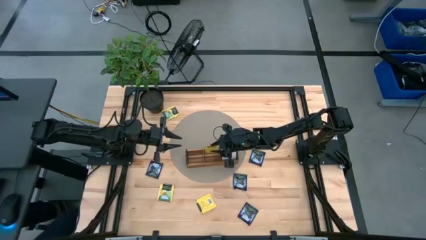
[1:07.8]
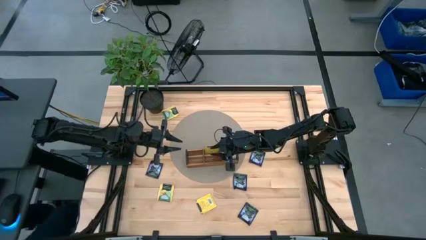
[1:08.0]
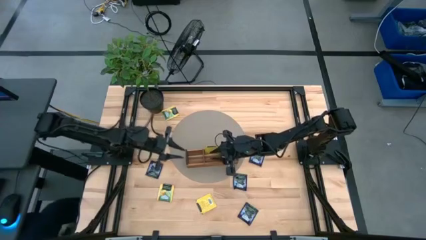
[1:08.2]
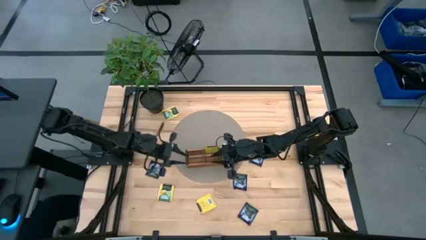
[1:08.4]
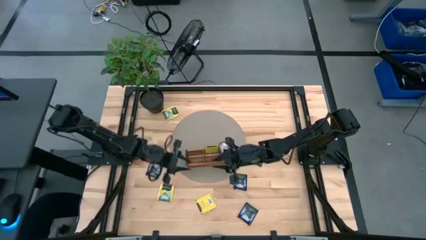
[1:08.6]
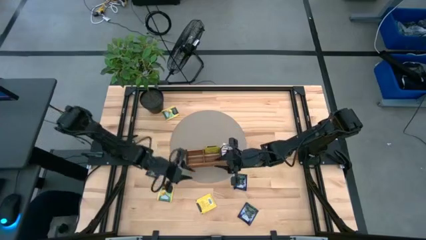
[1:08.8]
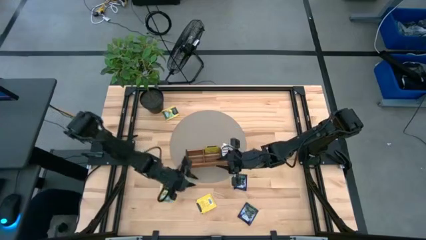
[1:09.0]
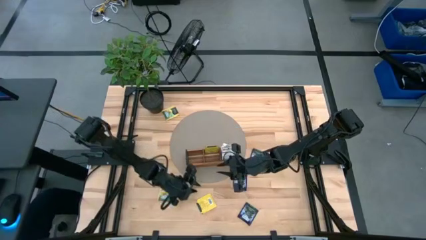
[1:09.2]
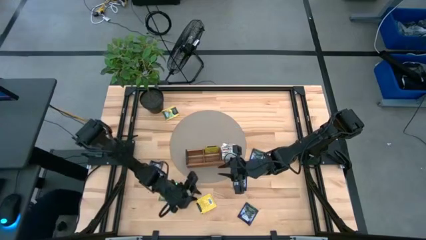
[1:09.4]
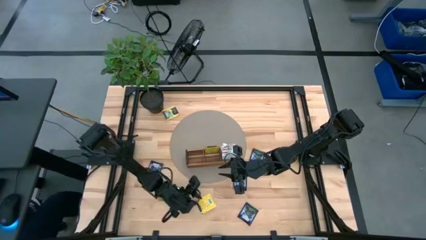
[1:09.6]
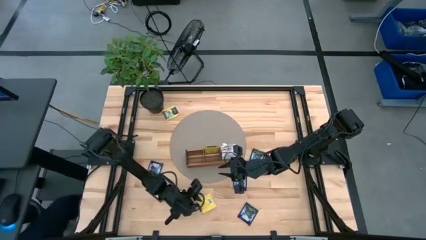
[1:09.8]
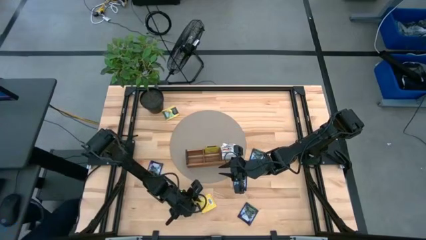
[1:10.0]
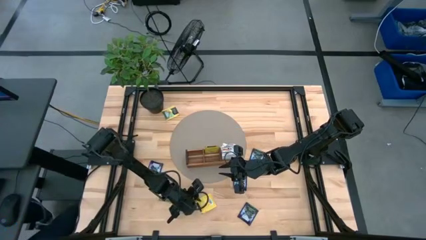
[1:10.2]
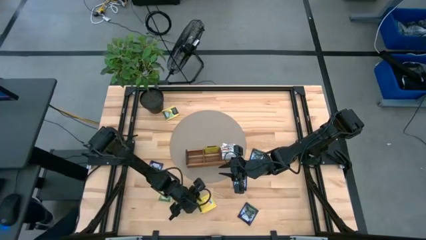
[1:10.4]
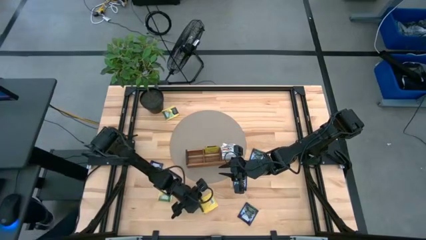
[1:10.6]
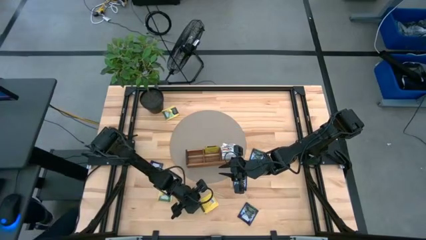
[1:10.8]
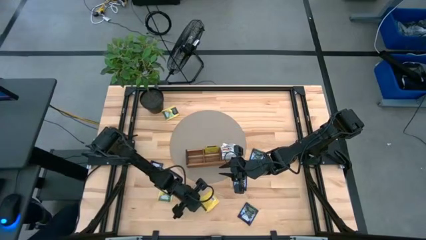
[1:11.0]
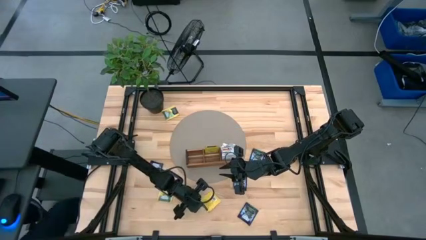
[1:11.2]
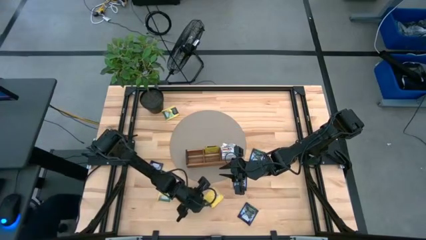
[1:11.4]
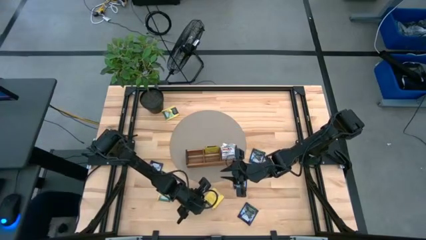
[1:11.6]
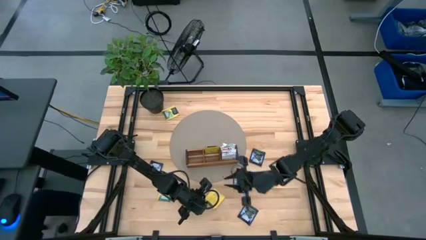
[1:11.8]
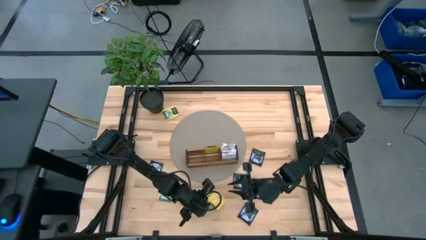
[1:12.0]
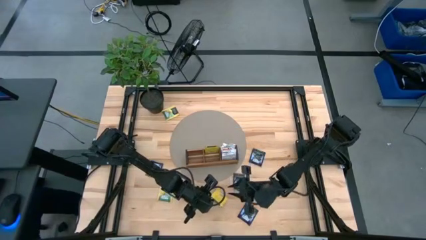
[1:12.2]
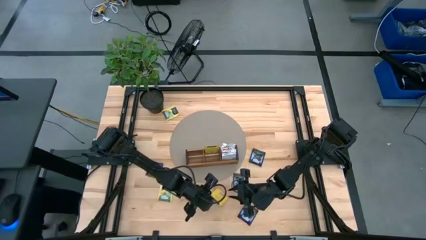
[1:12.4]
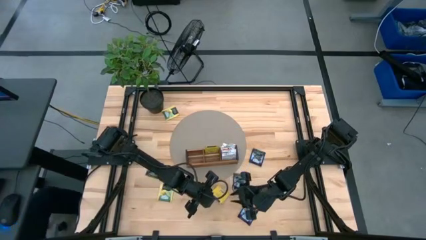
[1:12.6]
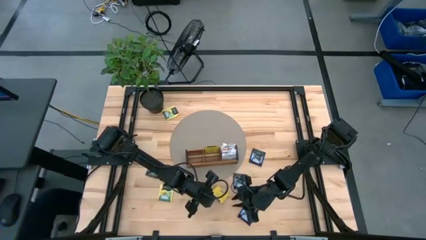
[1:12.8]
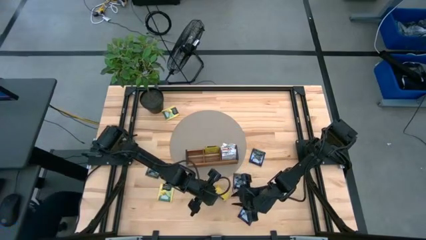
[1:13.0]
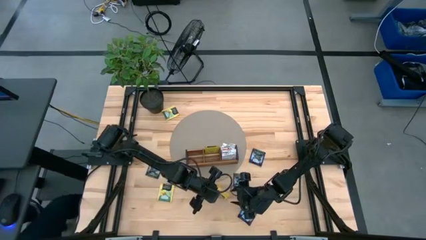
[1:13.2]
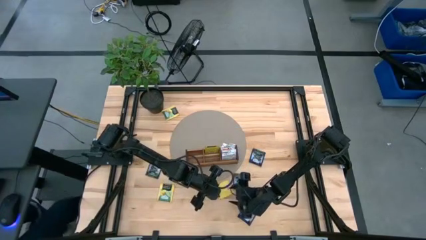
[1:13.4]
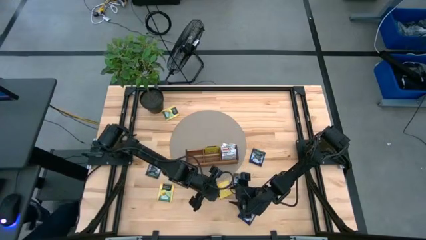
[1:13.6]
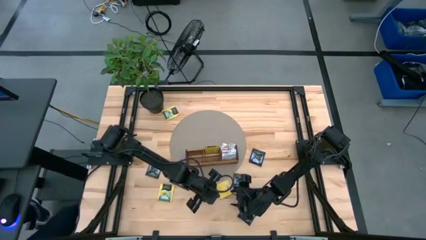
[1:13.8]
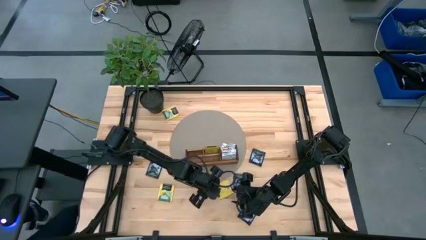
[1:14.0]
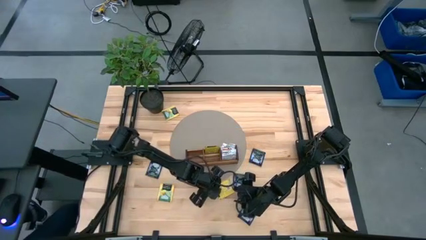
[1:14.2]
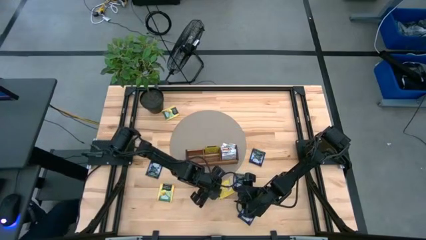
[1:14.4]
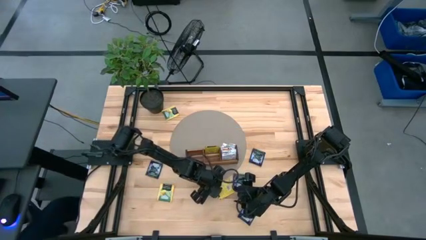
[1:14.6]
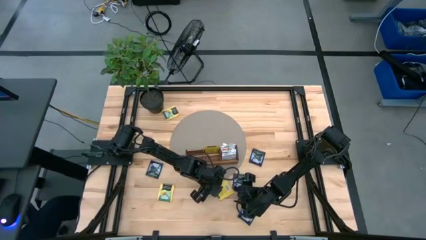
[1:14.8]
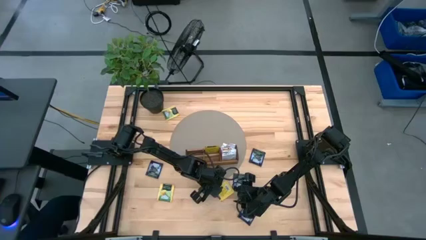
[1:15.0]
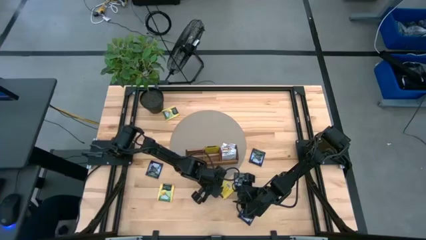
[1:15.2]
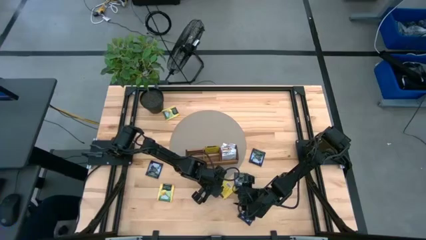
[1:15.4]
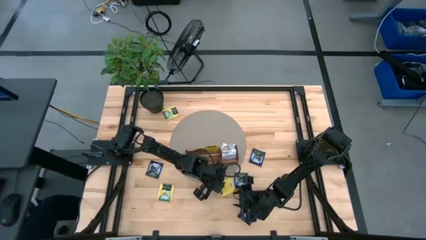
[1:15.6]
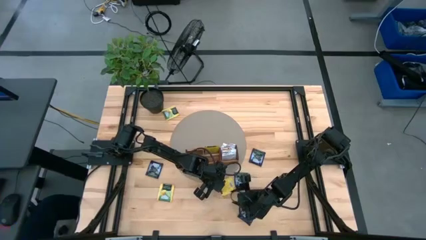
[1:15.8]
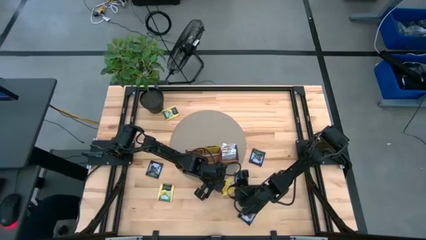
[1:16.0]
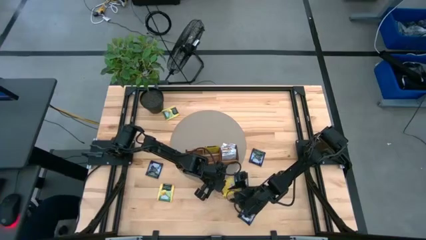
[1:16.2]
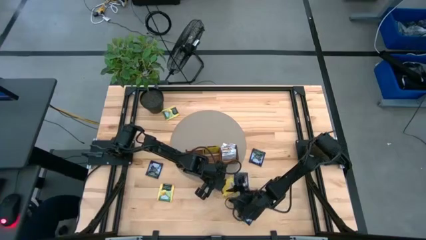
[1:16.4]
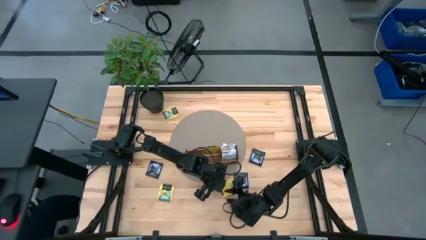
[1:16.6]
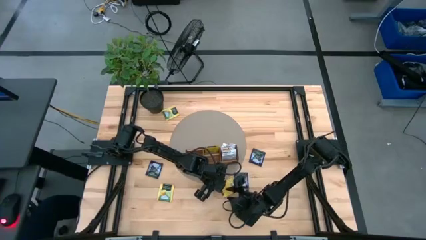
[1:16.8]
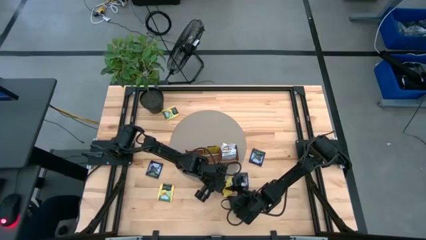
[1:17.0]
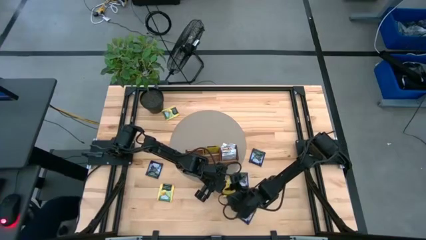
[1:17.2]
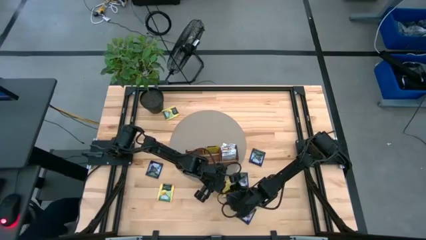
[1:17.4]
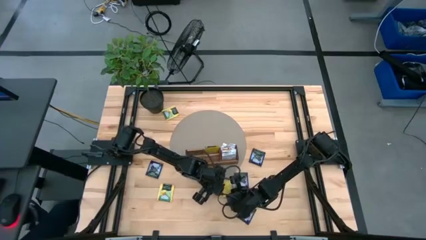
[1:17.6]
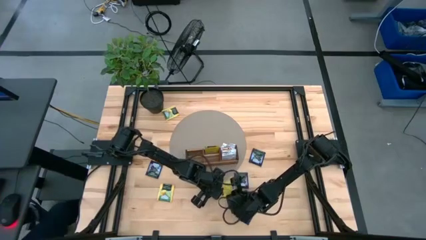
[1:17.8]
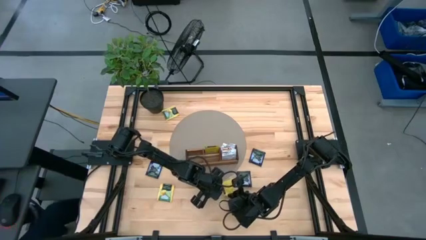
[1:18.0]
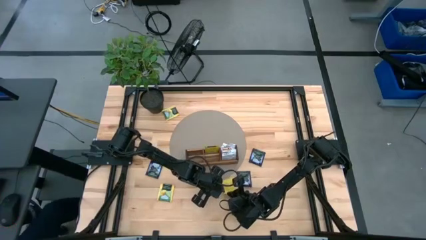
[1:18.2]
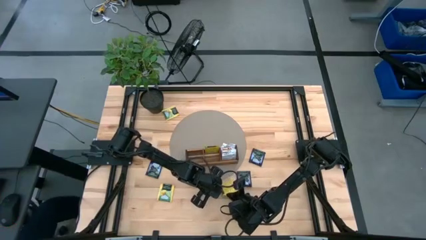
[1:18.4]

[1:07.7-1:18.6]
Task: Pick & Place Tea
Put the yellow tea bag into the middle section of the wooden organizer

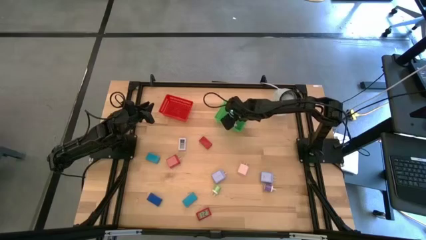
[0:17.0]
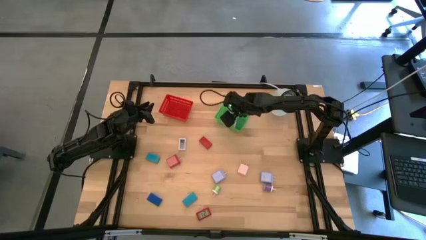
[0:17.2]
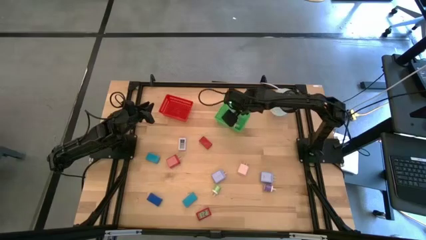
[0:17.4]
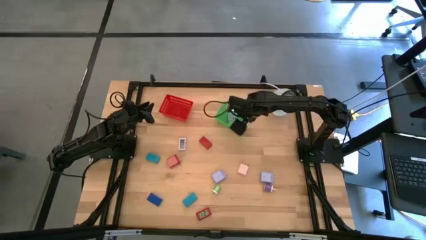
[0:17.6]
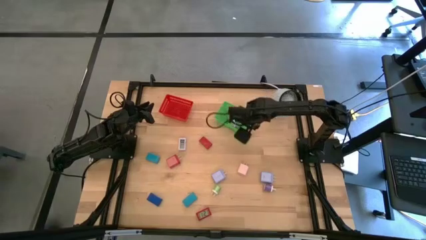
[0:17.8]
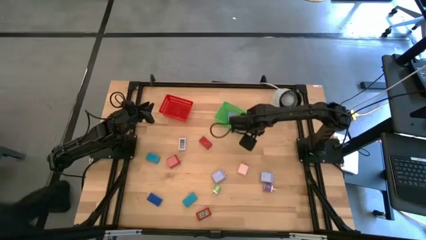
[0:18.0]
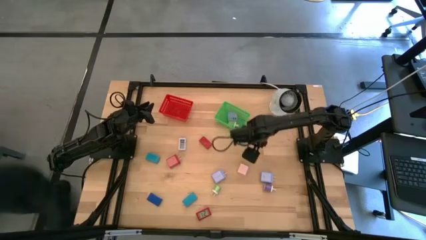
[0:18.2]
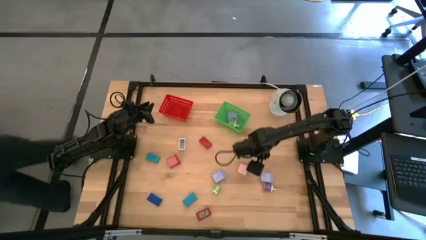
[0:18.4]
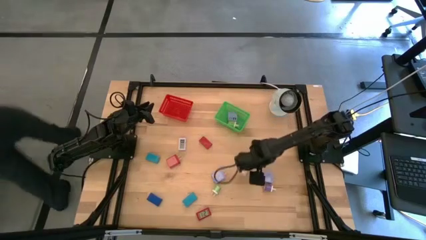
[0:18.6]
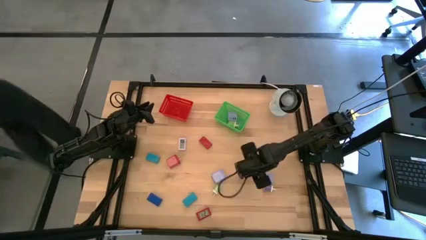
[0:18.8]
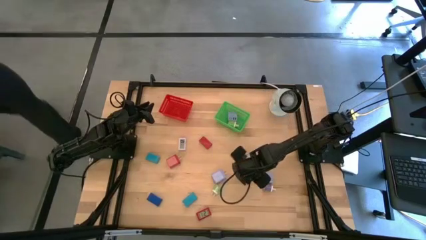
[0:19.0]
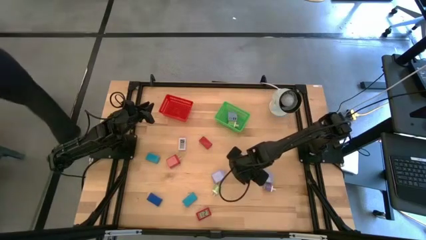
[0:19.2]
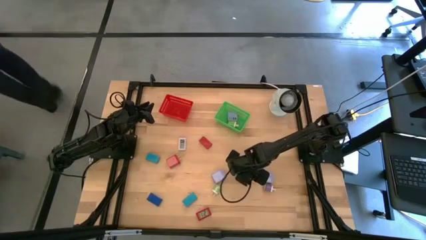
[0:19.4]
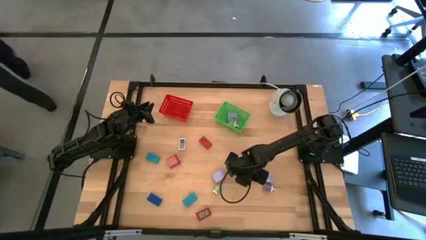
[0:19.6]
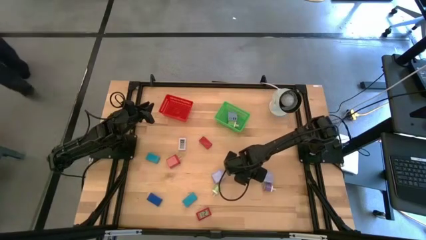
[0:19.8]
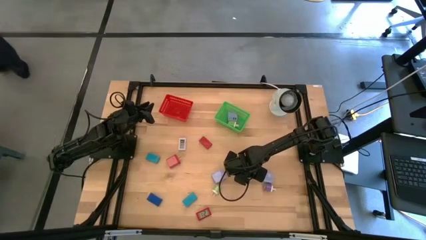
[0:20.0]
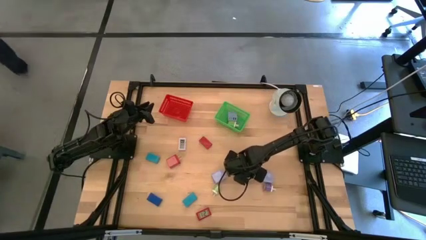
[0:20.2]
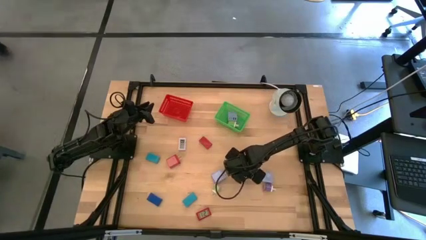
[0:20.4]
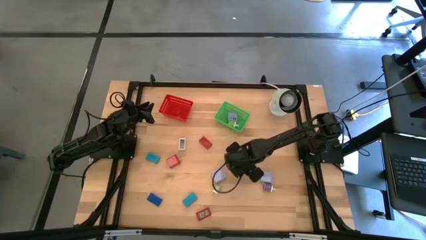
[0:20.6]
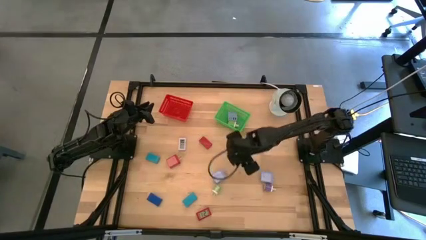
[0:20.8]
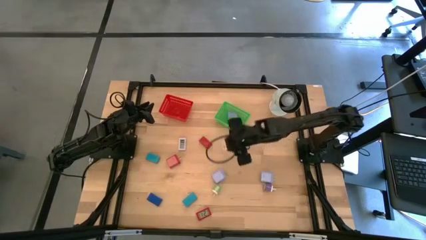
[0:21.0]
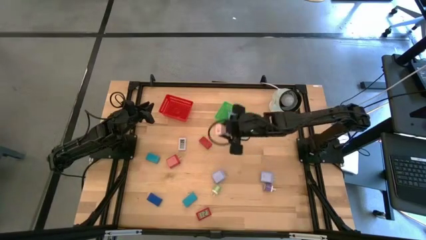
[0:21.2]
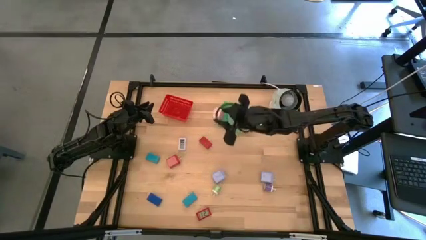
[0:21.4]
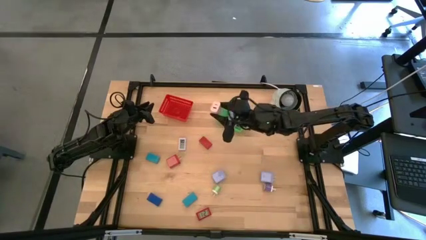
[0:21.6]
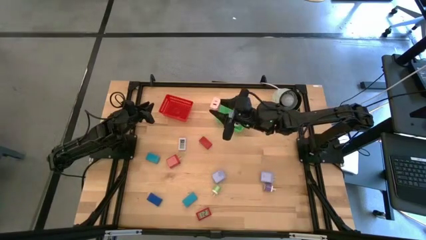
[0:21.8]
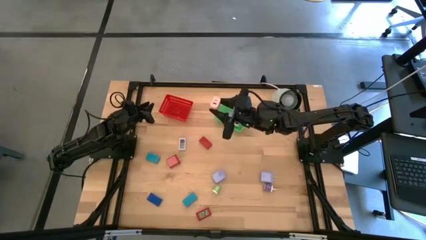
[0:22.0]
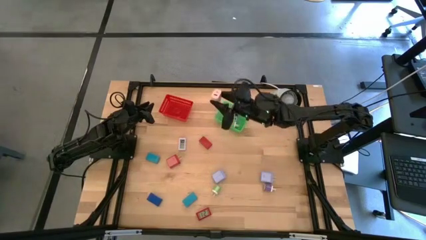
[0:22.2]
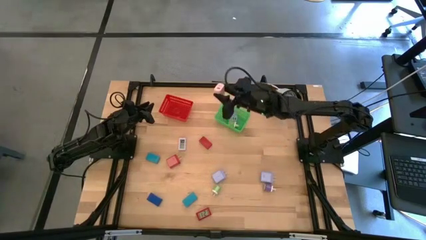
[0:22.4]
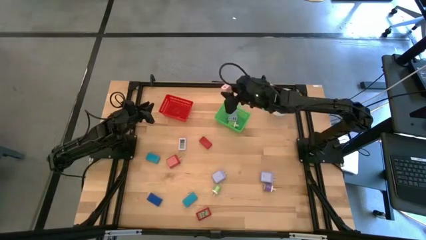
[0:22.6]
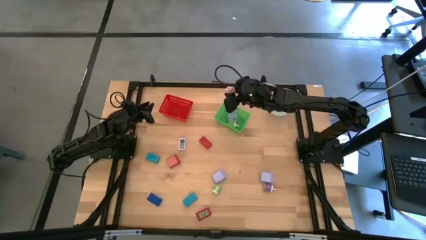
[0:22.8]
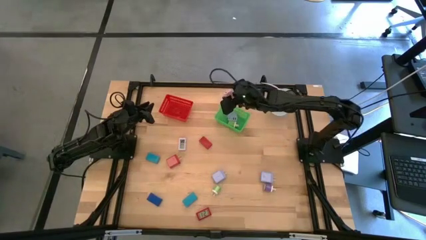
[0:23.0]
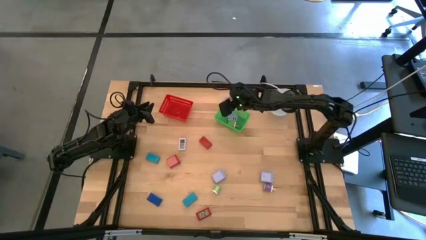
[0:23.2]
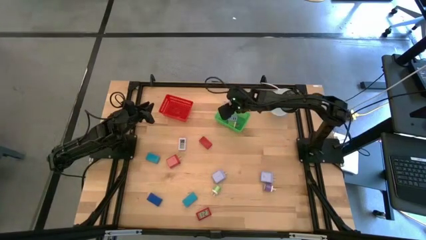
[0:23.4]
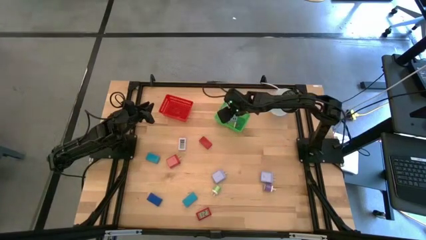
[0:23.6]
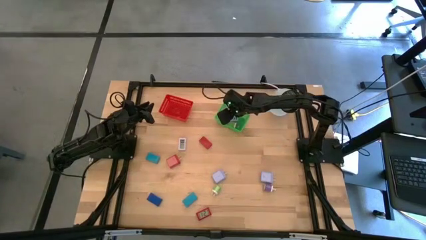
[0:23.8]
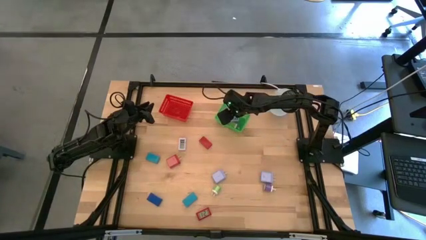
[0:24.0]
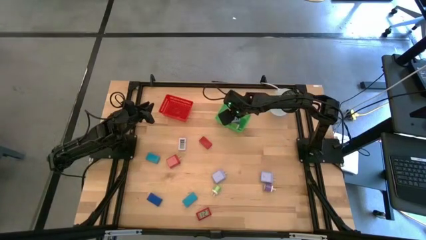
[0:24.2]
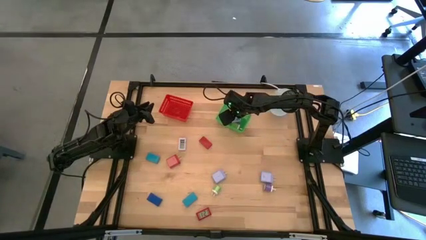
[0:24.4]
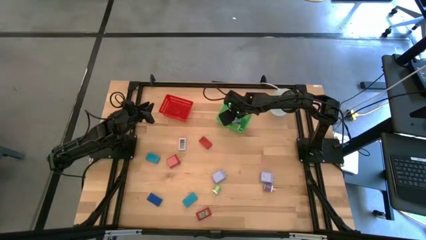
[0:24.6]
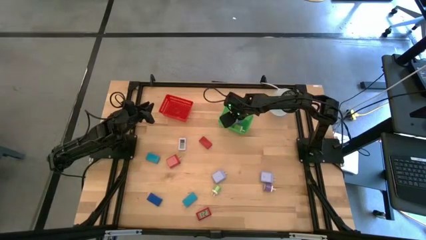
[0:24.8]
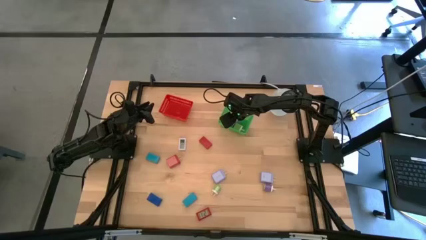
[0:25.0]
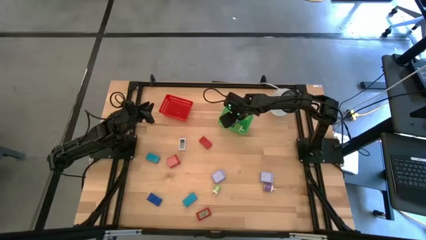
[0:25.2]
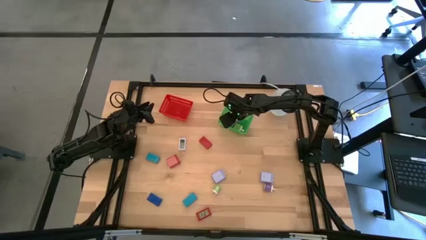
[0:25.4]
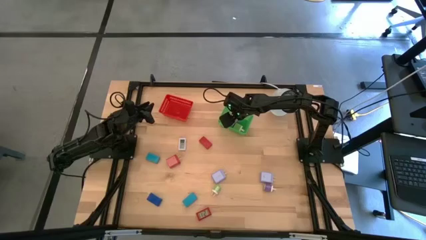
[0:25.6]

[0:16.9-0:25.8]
Task: Pick & Place Office items
Put the pink charger adapter into the green bin
